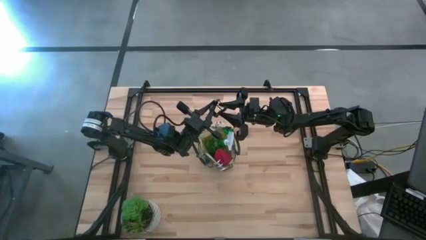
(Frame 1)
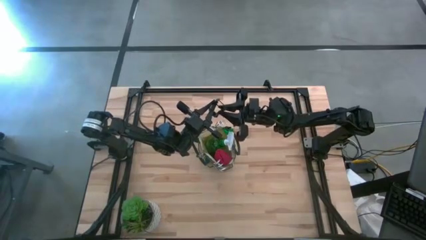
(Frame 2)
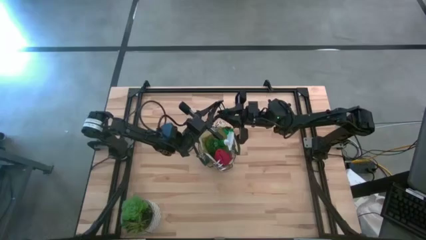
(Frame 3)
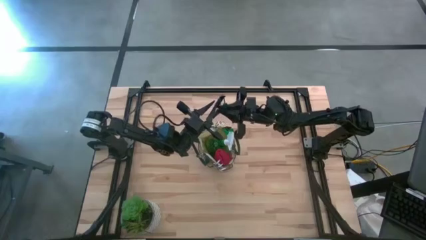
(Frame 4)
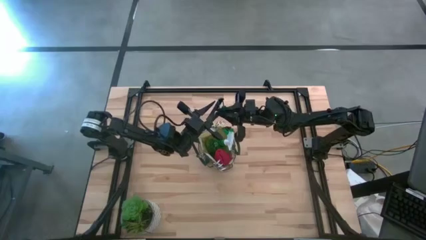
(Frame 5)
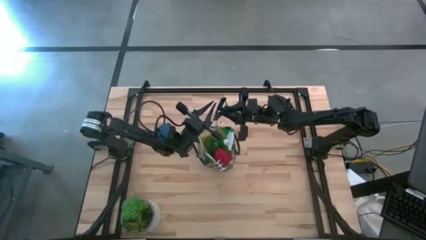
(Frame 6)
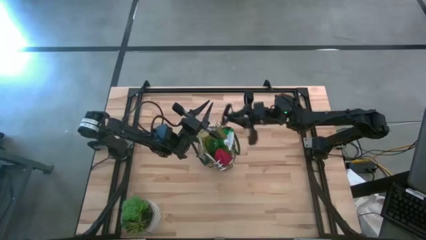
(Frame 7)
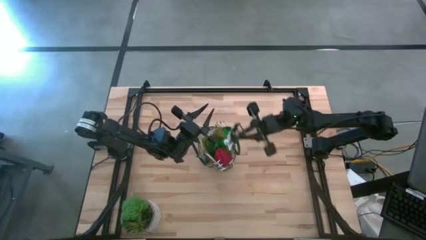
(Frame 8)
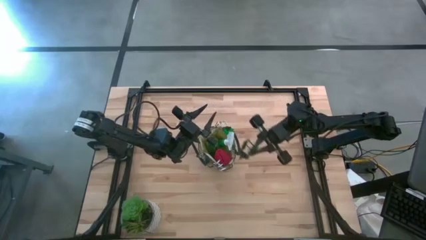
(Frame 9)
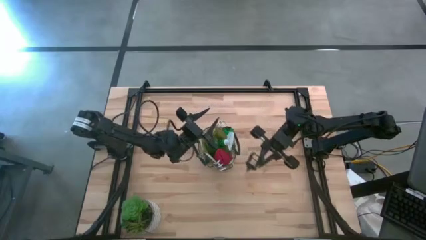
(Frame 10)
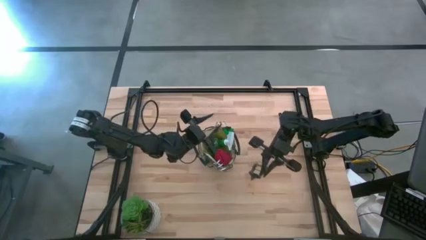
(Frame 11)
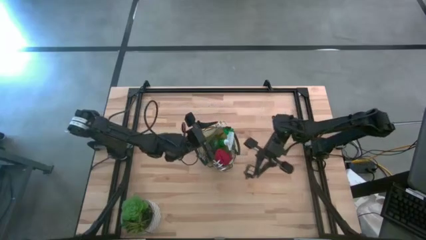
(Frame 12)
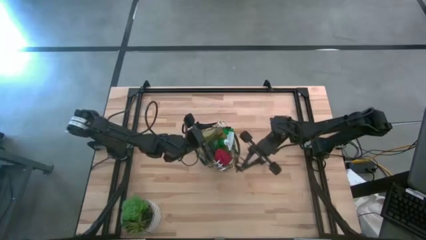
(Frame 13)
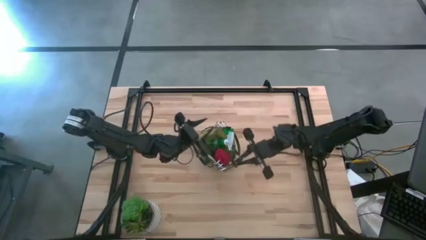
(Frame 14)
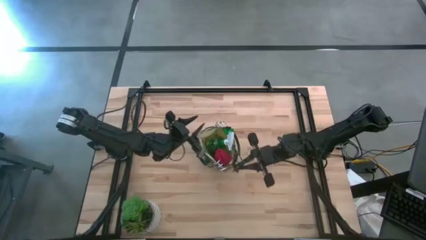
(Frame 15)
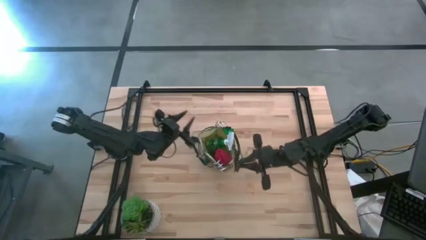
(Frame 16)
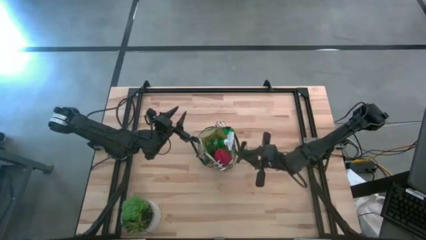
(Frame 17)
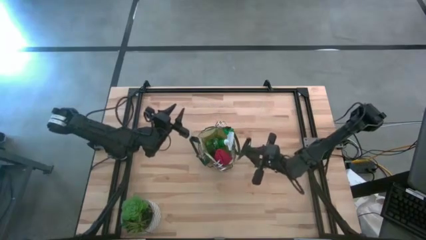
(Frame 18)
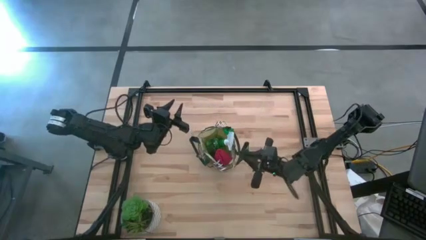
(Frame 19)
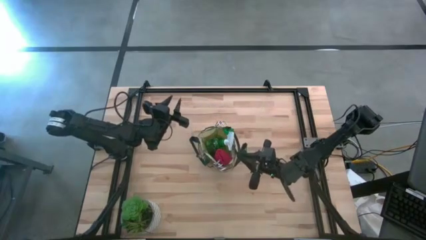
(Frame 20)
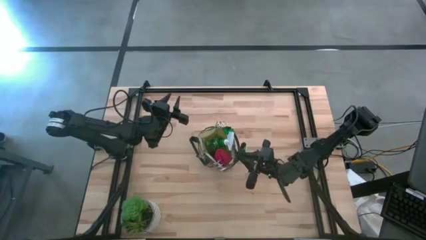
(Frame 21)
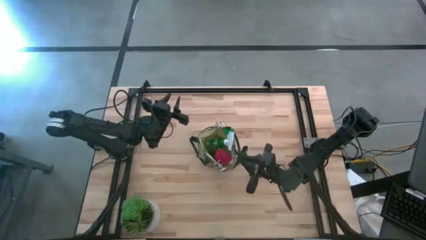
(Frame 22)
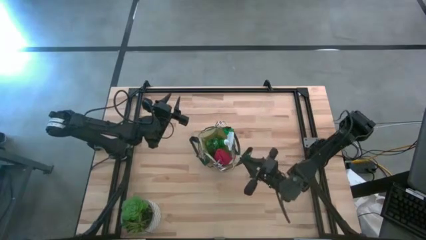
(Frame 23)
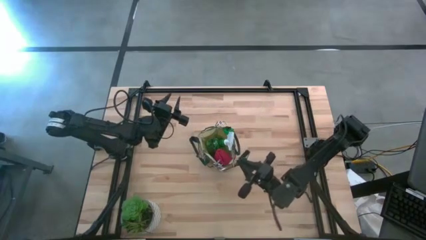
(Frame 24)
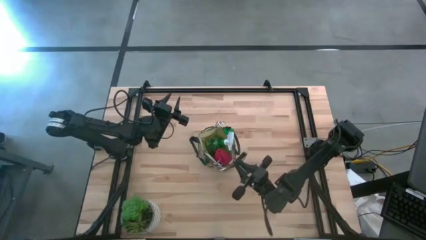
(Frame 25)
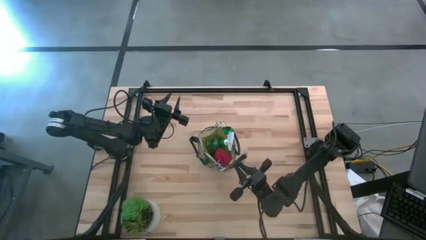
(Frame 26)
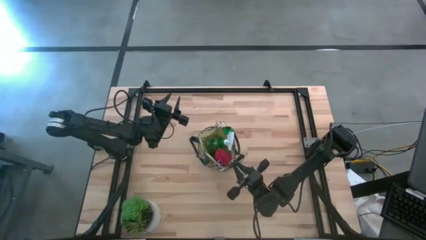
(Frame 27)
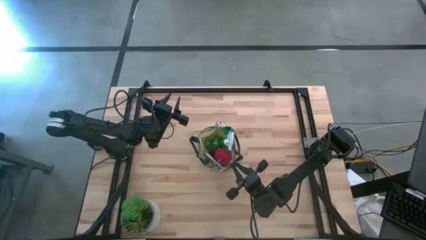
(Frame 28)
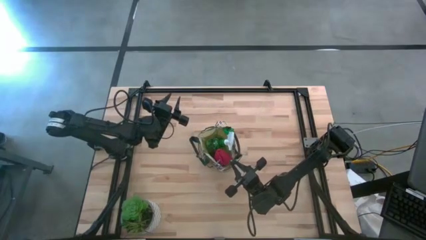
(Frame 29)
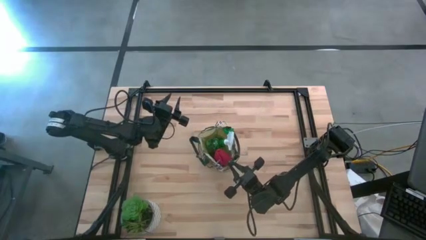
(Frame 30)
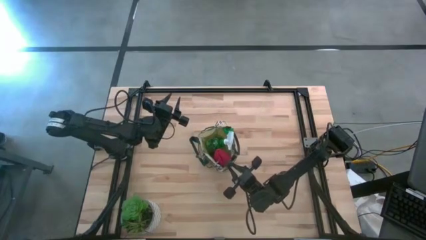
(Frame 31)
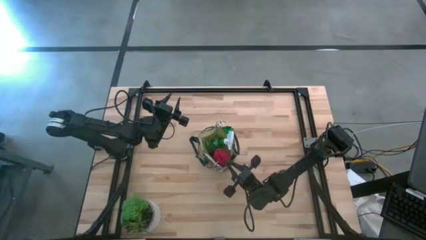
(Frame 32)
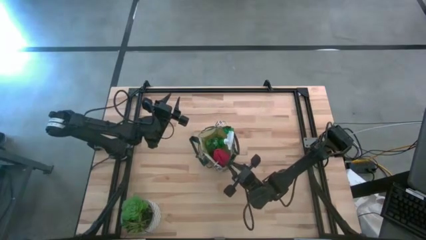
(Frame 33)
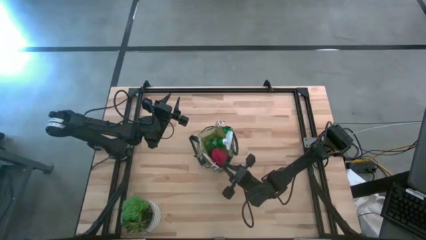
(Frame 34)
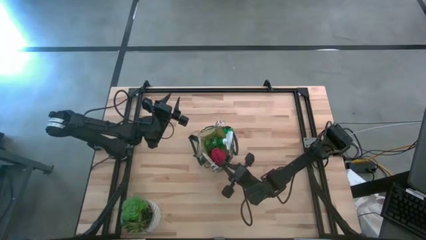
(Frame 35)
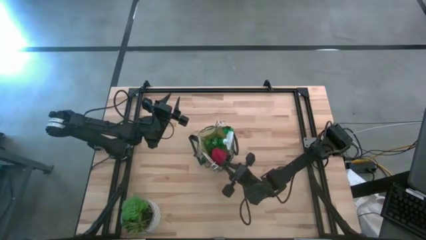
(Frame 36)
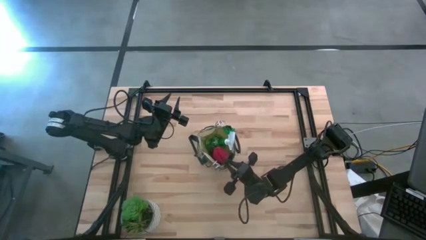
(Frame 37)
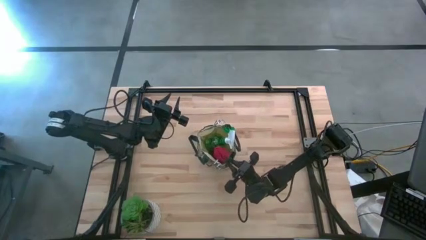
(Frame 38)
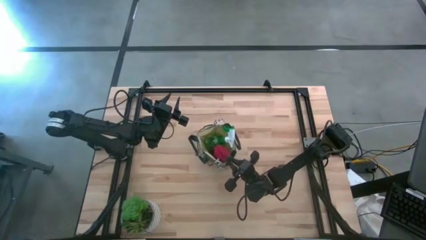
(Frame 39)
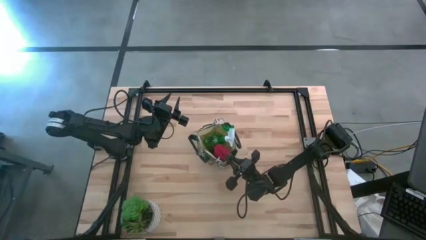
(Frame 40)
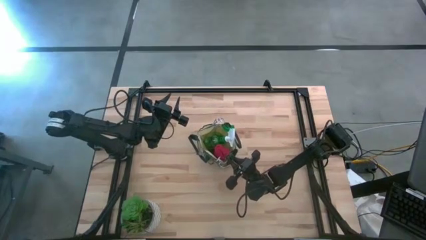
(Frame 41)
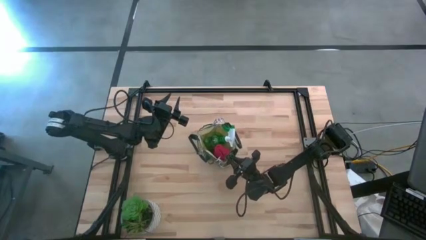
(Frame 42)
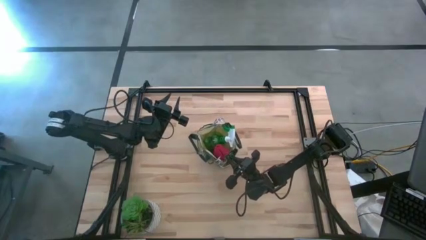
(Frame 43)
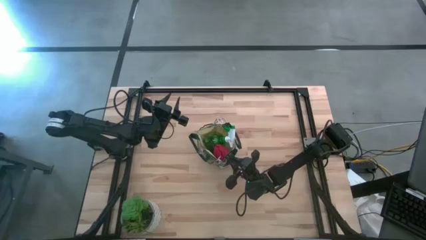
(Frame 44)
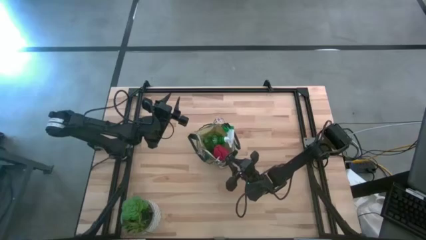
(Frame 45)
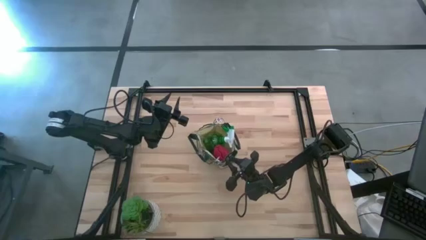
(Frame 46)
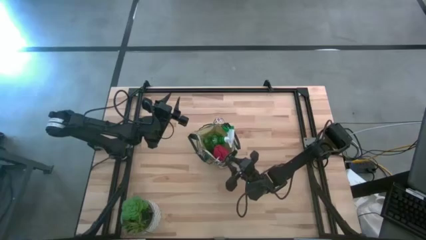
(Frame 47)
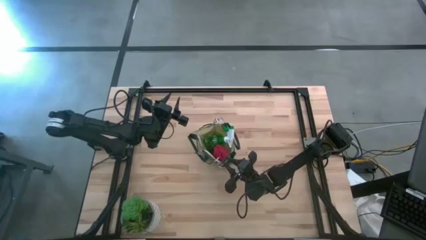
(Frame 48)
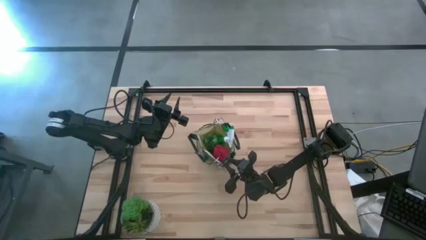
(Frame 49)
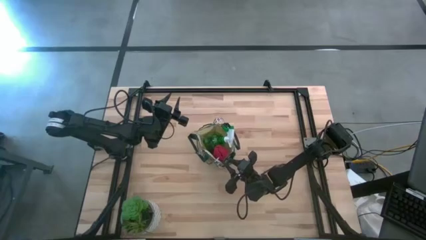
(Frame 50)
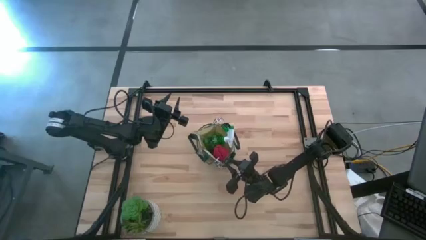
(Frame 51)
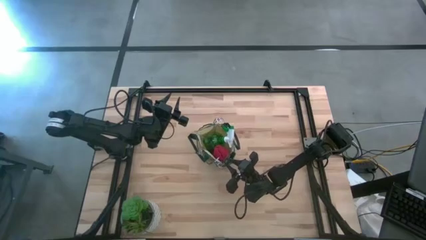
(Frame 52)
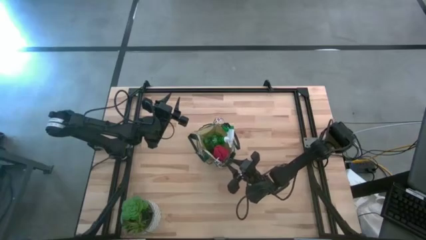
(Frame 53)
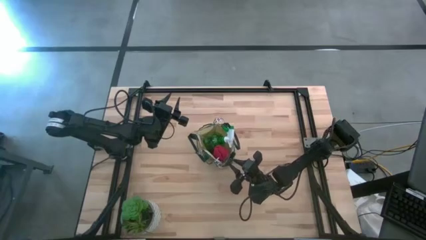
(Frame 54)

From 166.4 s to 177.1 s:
Task: Pick & Place Garden tools in Gardening bag
Put the shear scissors into the pocket of the gardening bag

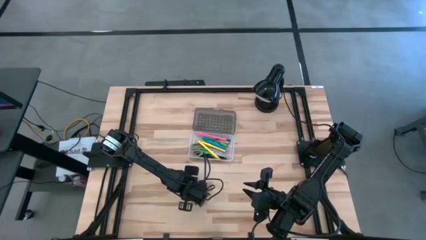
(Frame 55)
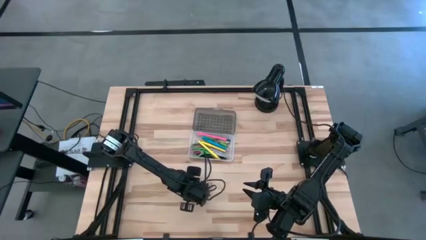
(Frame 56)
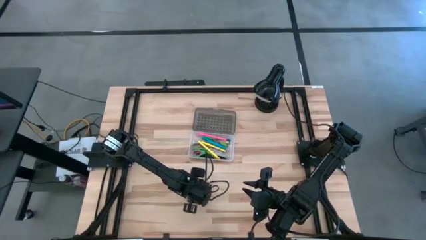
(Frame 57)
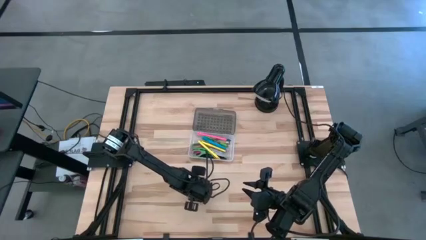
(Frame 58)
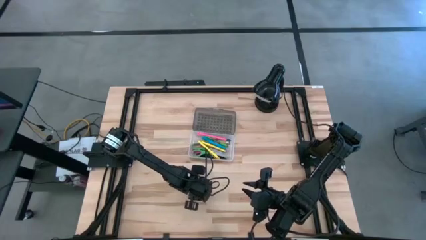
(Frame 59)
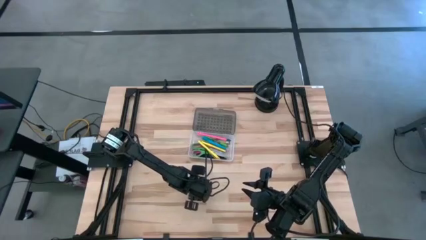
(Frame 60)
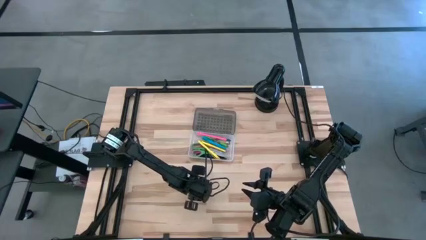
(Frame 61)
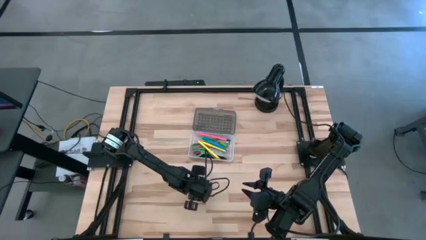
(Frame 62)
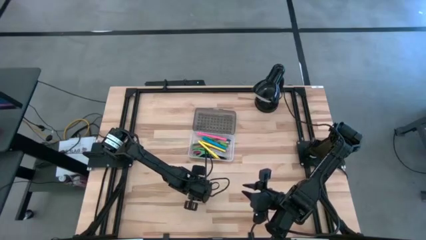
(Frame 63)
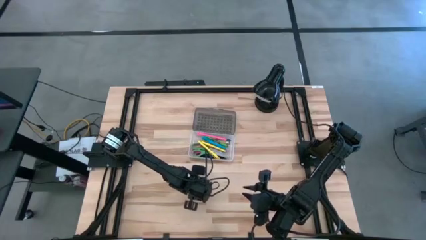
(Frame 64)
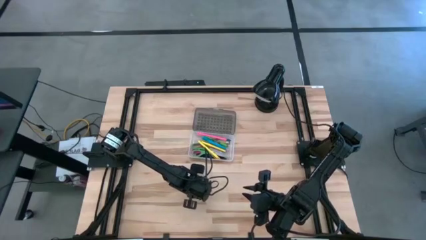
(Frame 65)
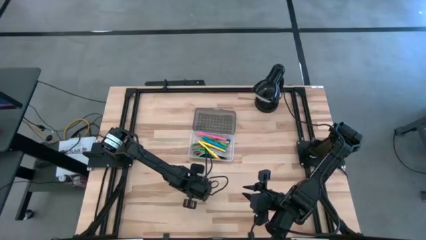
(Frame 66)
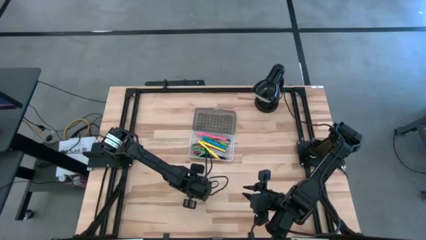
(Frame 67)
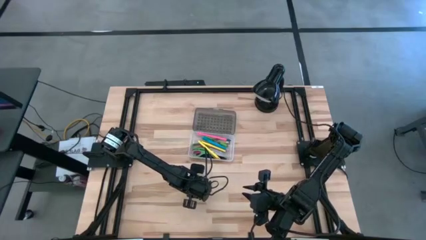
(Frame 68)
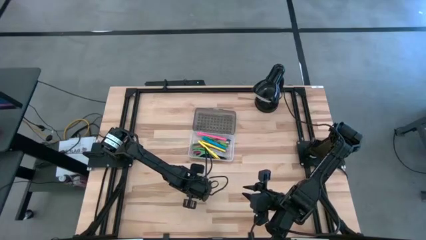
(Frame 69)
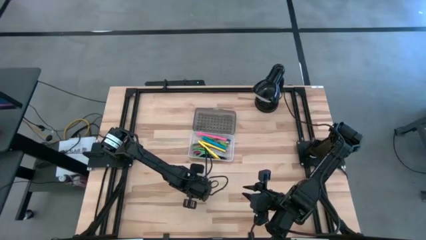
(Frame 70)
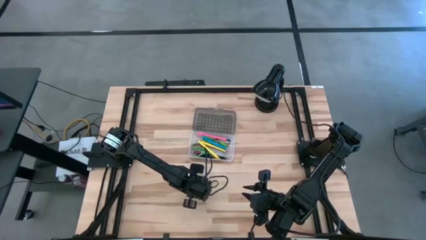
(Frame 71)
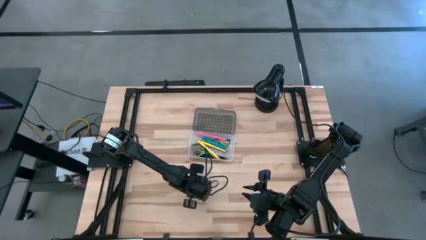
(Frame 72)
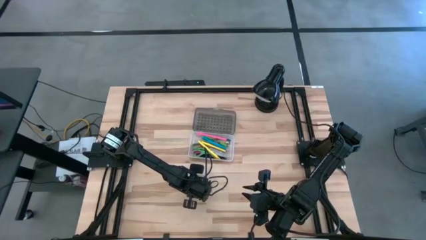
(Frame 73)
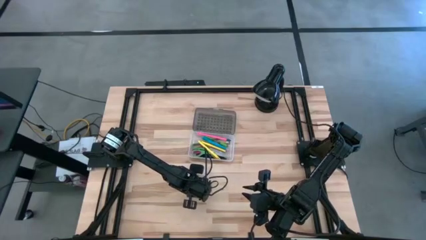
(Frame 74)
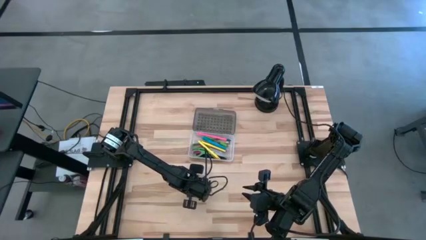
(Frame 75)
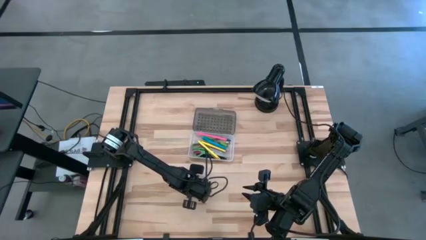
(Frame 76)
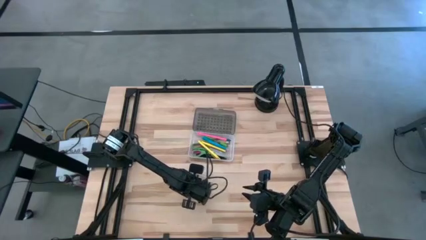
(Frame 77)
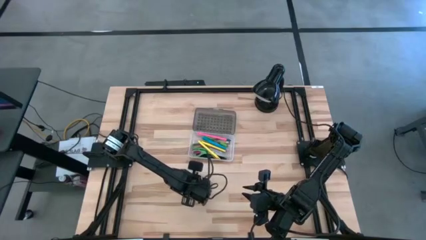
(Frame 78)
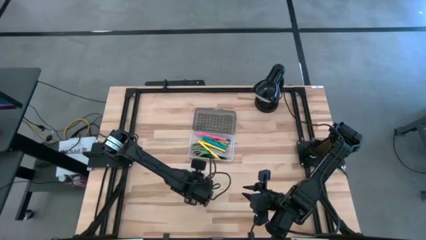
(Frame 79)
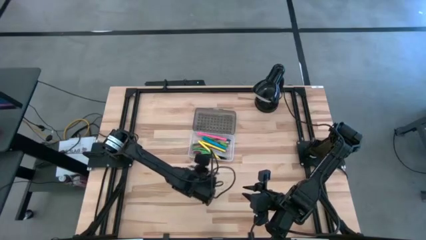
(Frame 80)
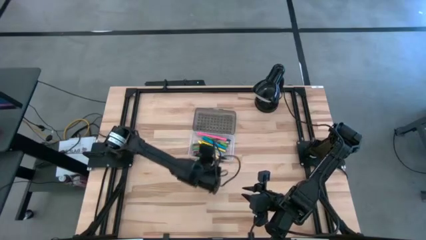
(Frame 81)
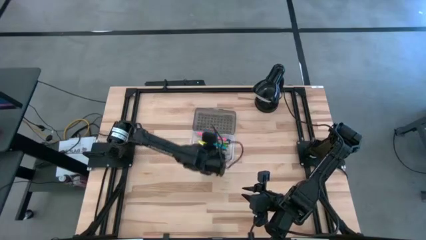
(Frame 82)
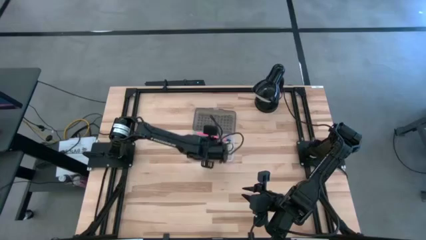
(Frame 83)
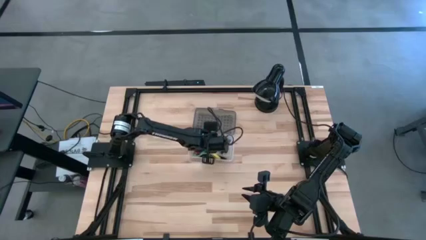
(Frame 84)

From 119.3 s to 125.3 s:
Task: Pick & place school supplies into a supply box
Put the black pen into the transparent supply box
